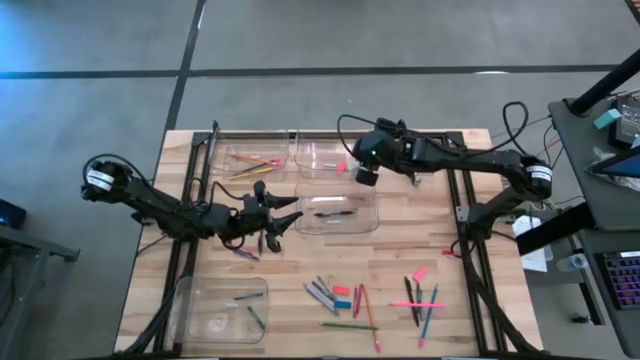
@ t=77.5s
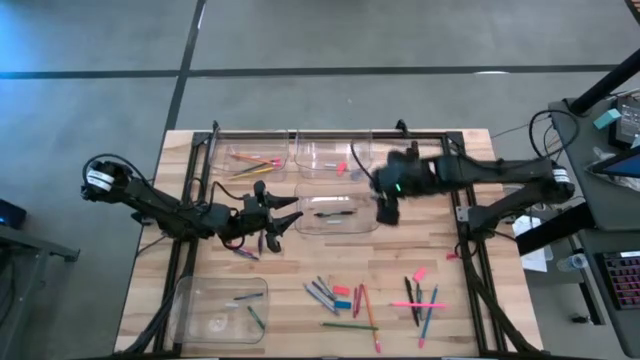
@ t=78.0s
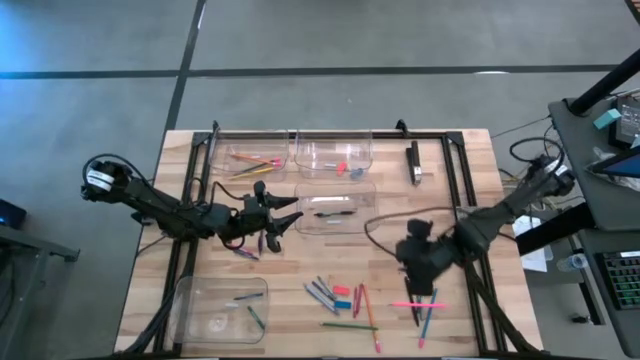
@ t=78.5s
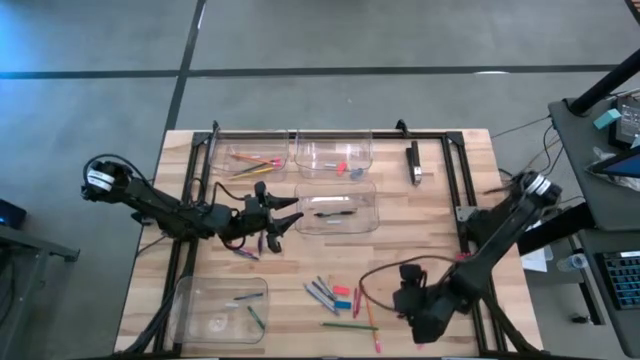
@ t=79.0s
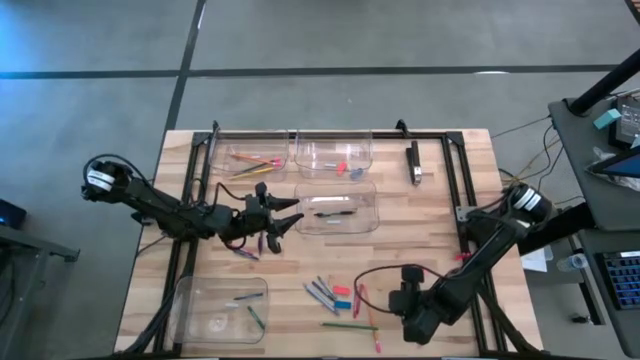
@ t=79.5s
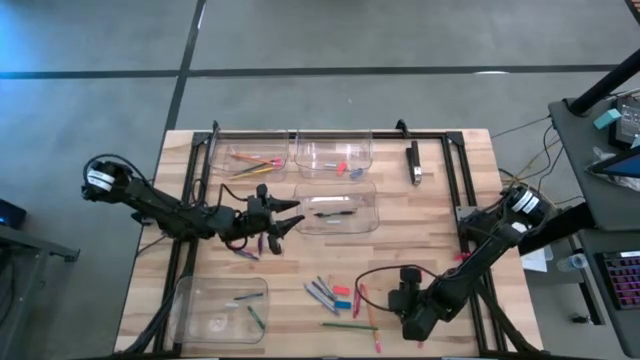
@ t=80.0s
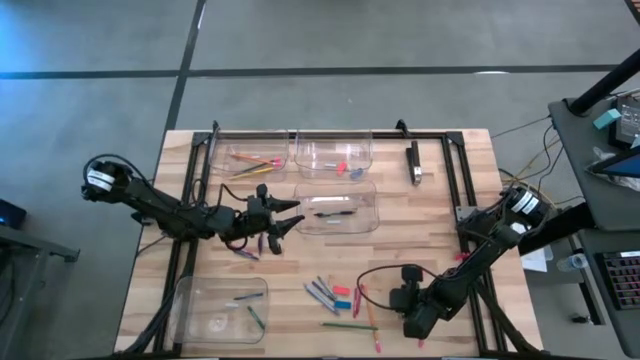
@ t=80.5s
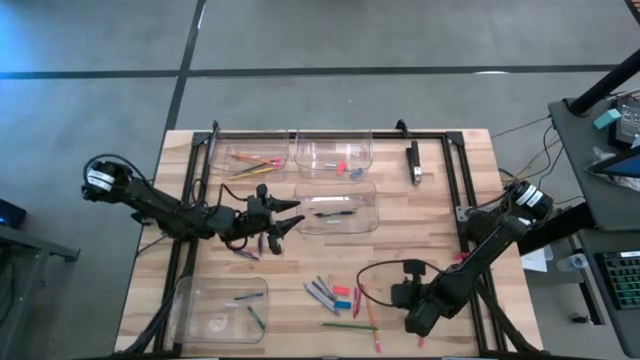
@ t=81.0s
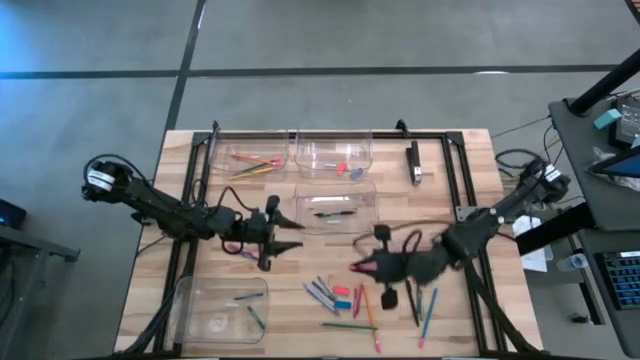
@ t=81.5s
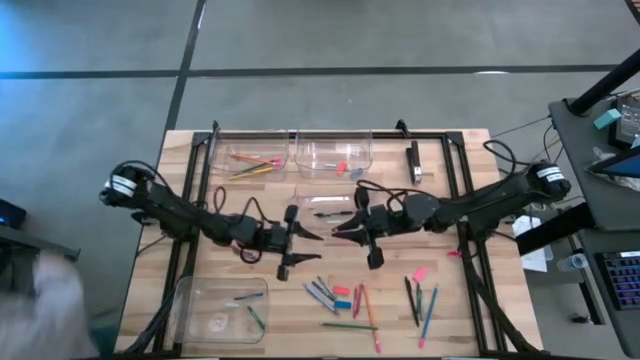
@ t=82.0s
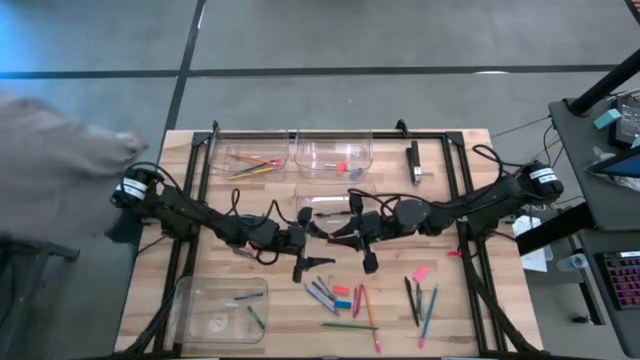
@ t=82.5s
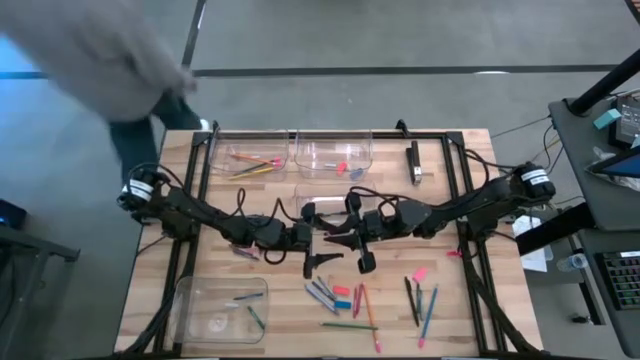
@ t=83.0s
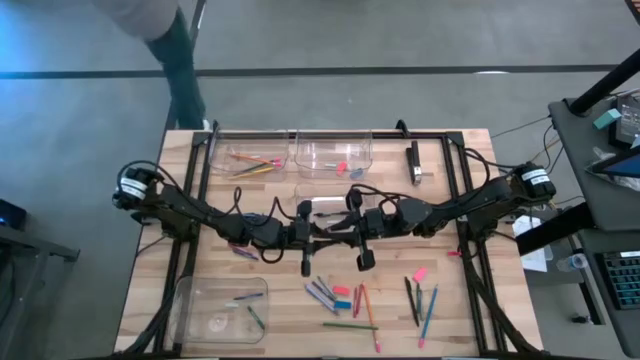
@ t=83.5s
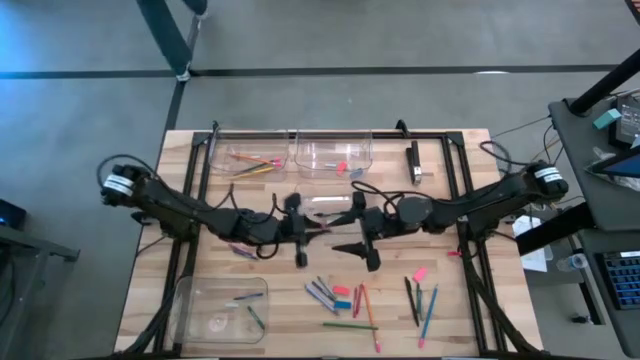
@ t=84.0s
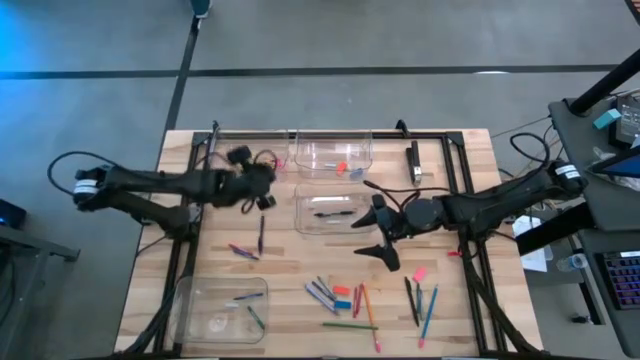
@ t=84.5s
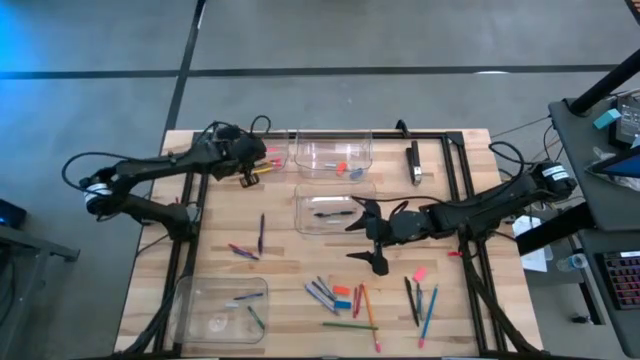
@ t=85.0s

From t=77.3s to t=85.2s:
Task: Sort crayons/erasers/pens/pencils in bins
Put the pink pencil into the top left transparent bin

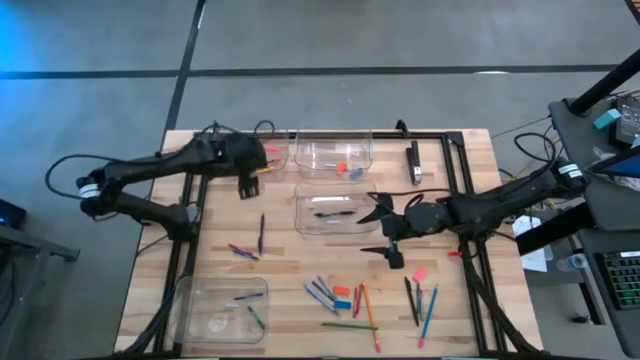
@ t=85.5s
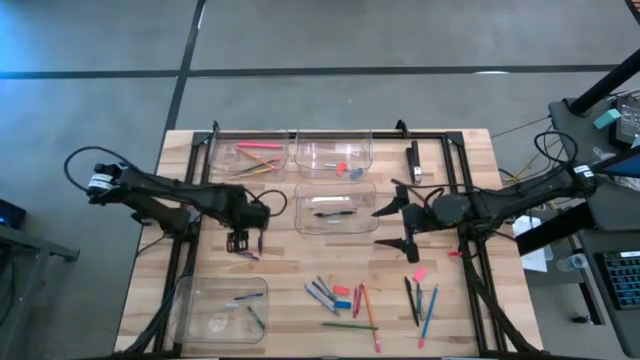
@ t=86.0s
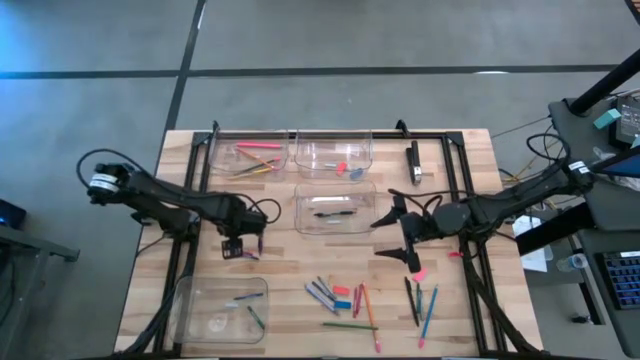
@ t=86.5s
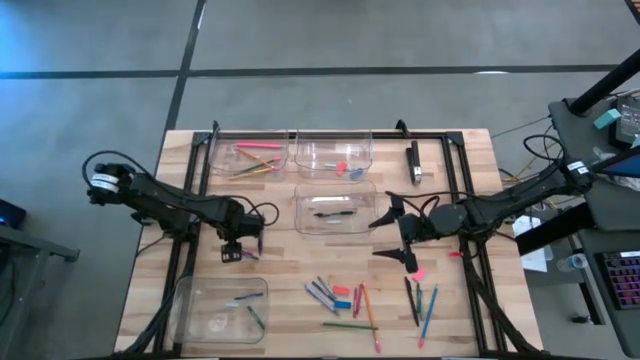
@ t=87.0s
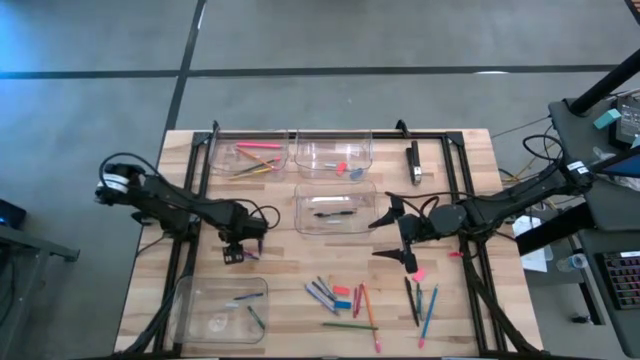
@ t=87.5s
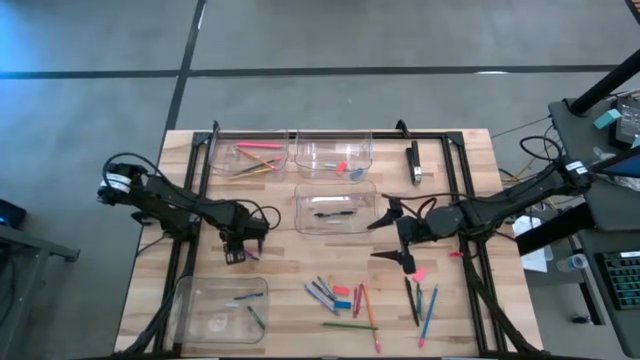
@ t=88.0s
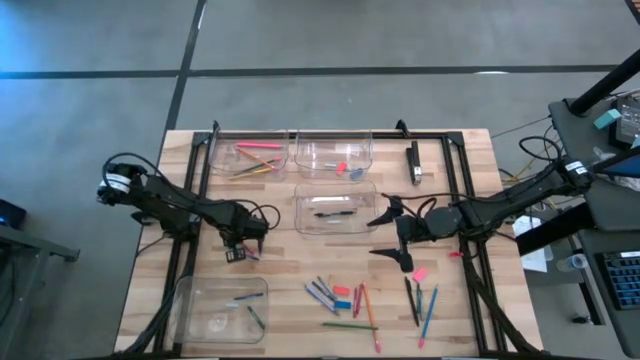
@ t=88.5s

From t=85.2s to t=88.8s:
Put the top red crayon into the bottom transparent bin

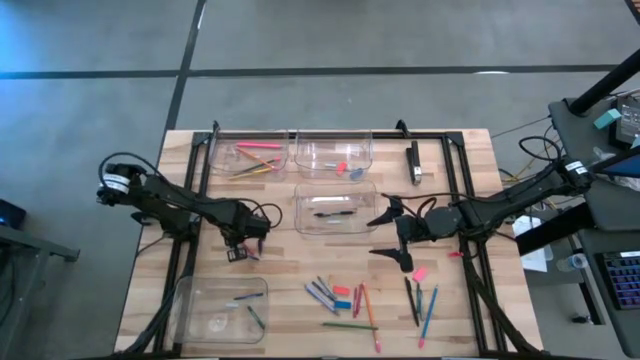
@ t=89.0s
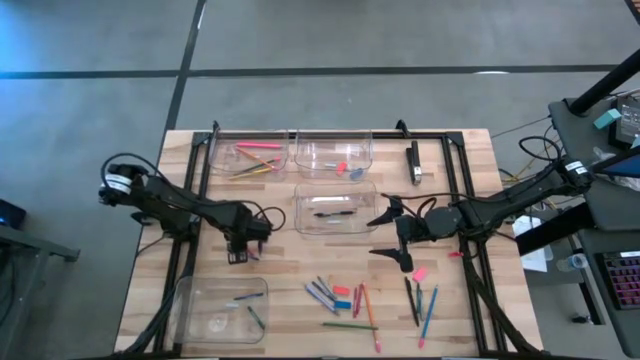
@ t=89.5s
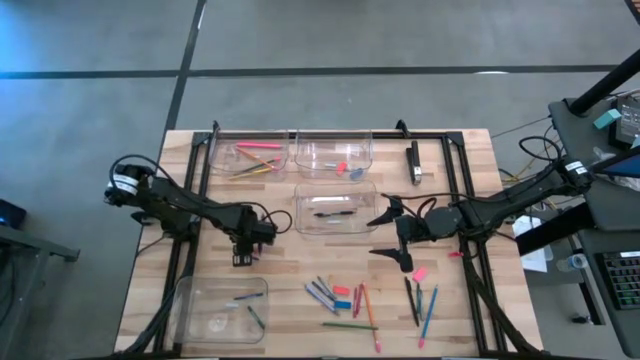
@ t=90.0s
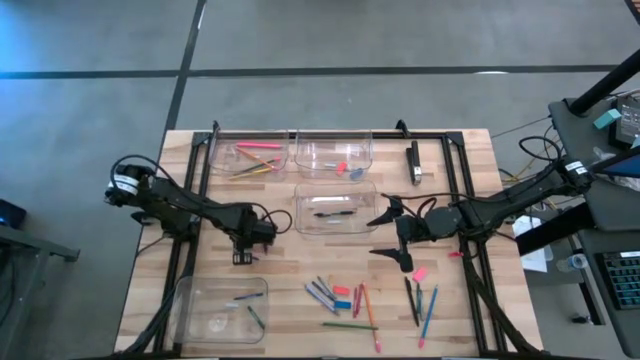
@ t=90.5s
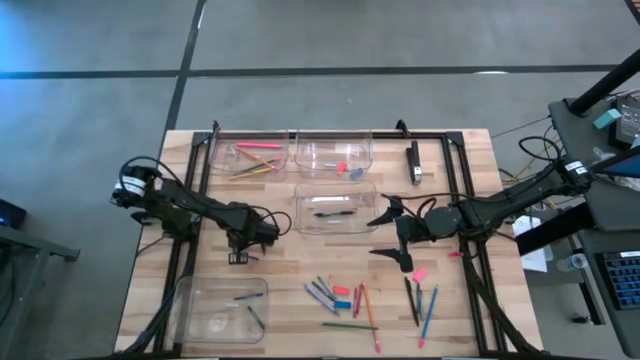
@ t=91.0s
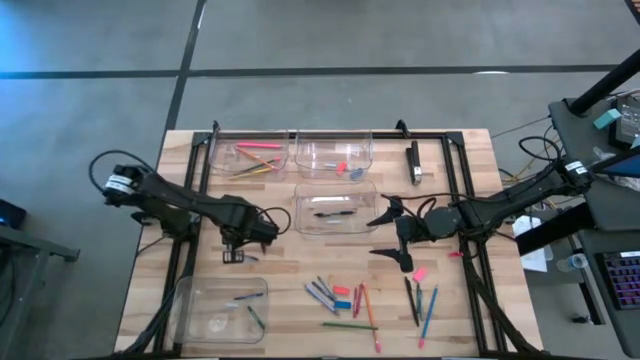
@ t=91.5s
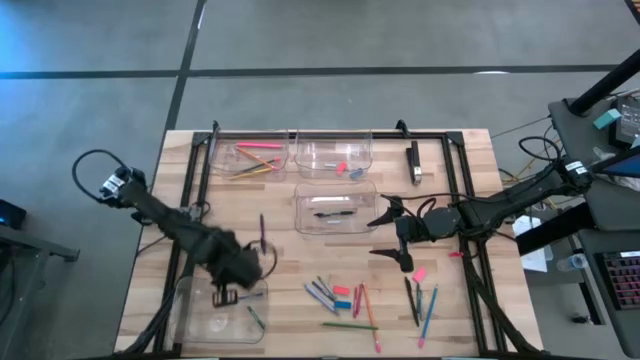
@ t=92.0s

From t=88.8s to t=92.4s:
Put the top red crayon into the bottom transparent bin

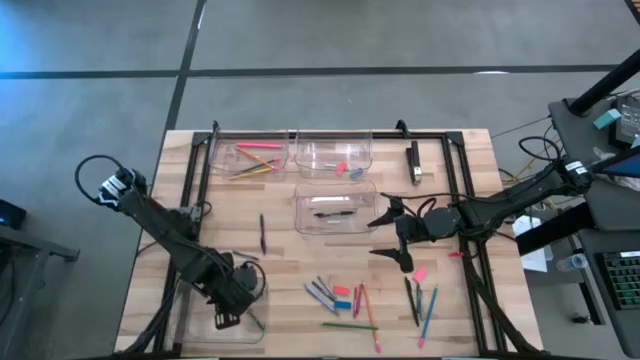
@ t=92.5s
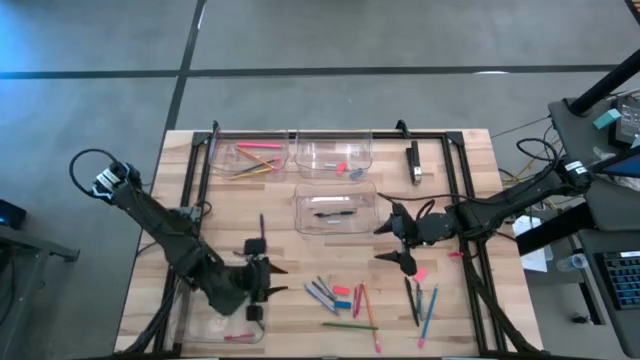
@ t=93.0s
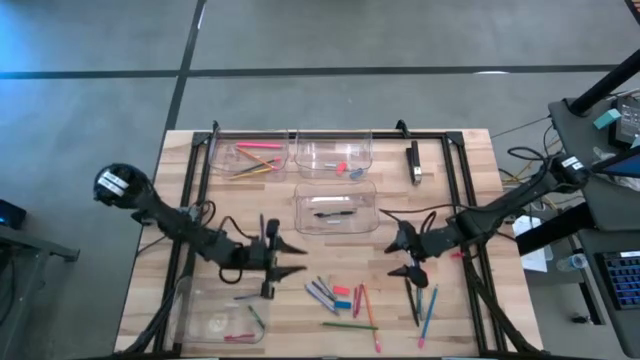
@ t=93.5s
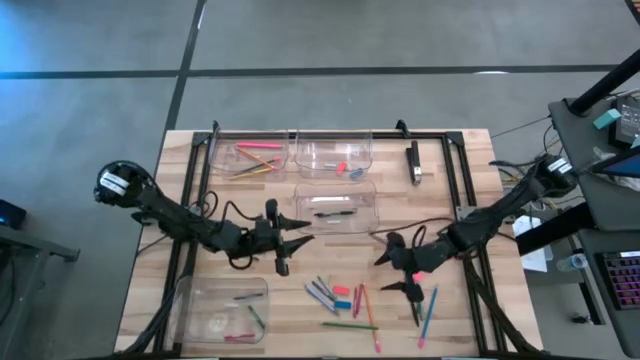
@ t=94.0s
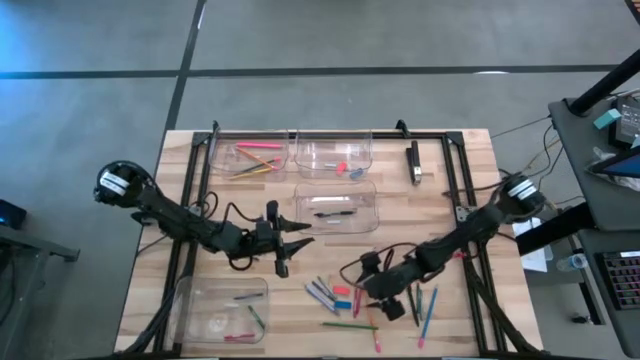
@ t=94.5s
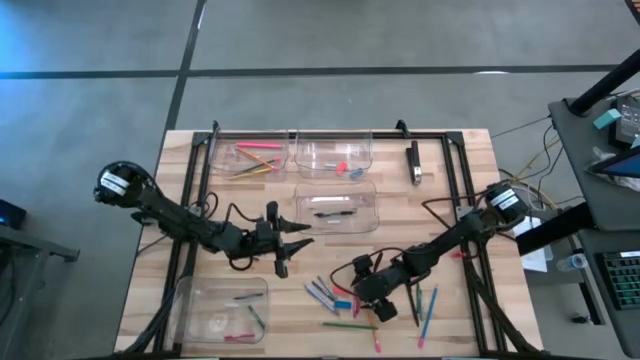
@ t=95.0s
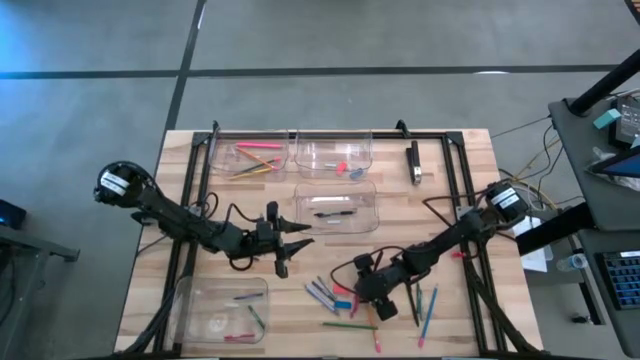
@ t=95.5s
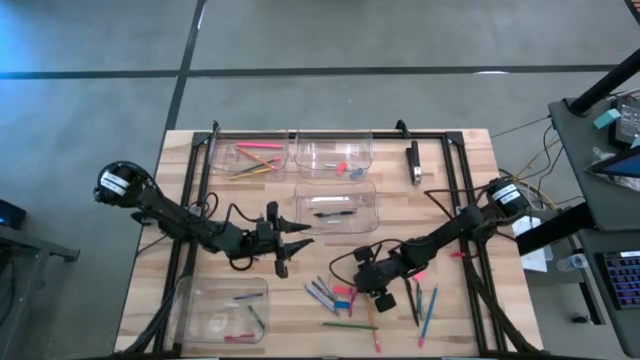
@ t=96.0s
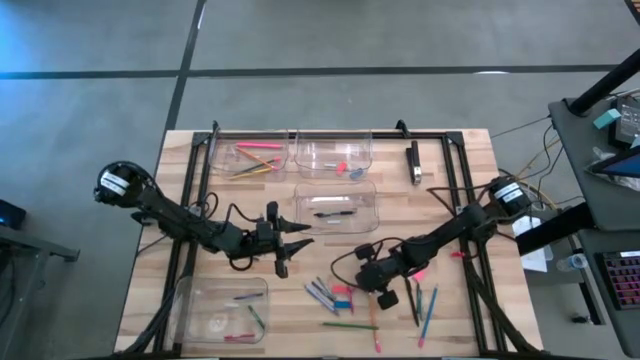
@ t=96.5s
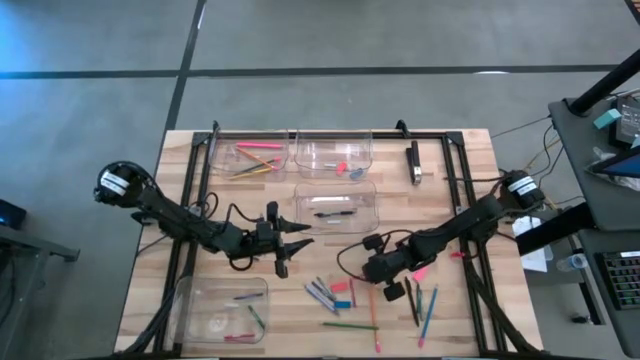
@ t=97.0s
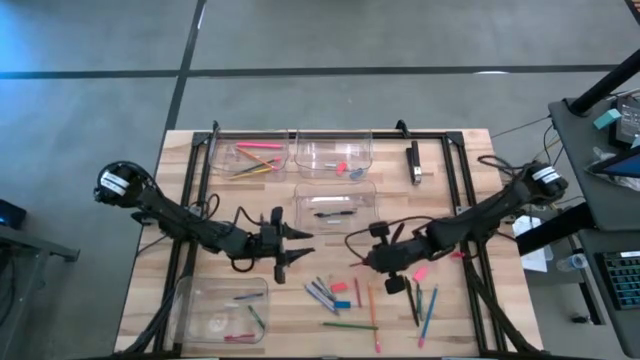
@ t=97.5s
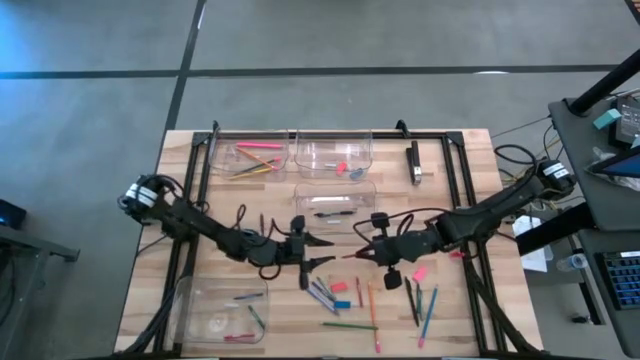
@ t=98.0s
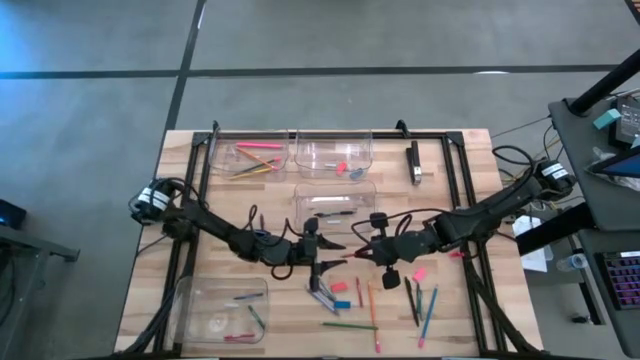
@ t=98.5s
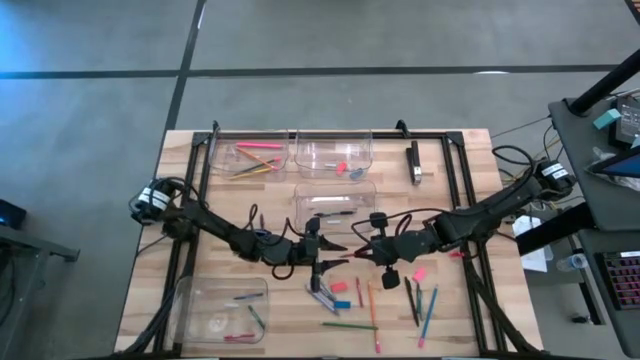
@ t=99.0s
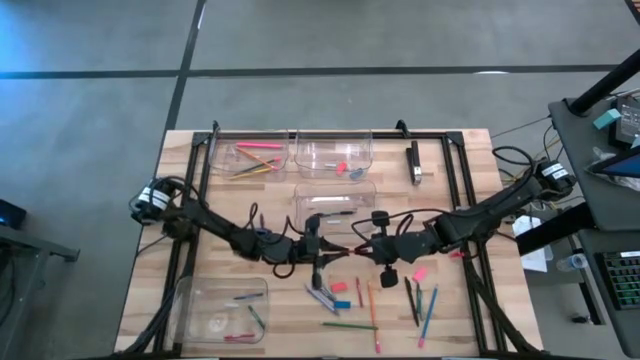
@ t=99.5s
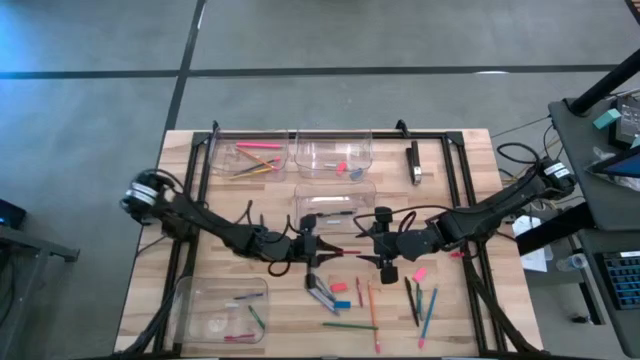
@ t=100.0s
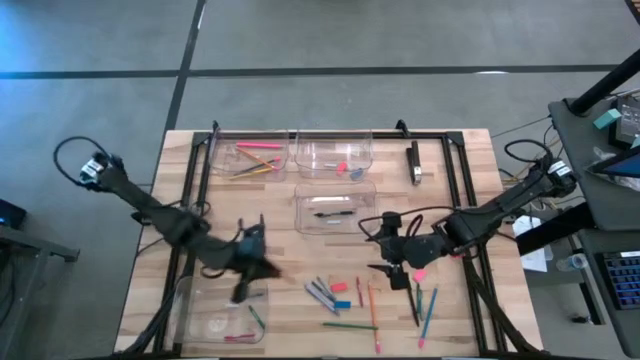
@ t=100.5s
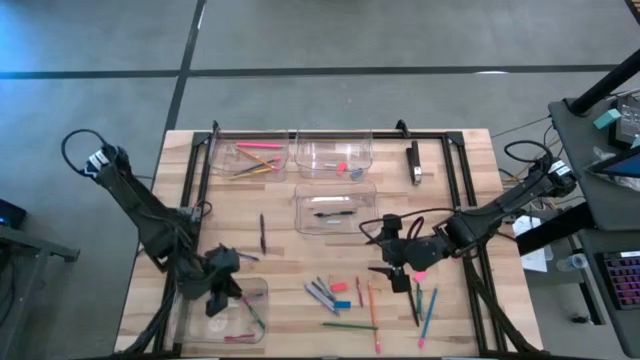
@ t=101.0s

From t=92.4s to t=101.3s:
Put the right red crayon into the bottom transparent bin
